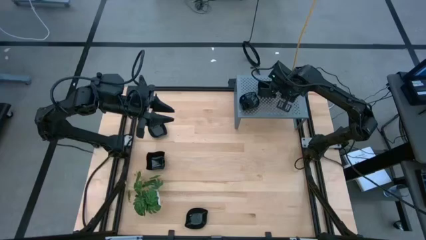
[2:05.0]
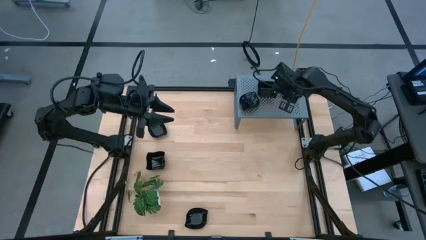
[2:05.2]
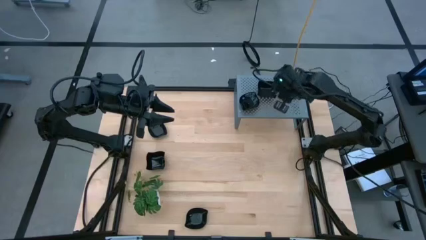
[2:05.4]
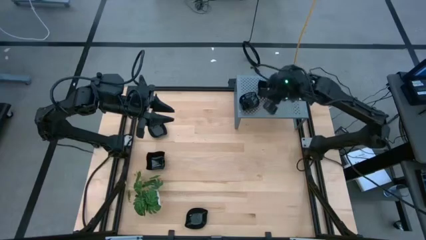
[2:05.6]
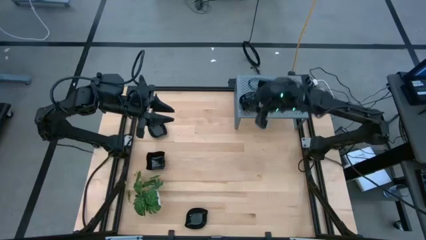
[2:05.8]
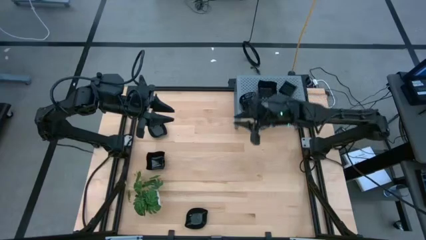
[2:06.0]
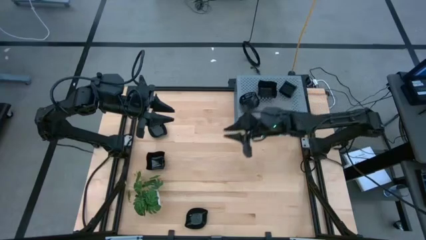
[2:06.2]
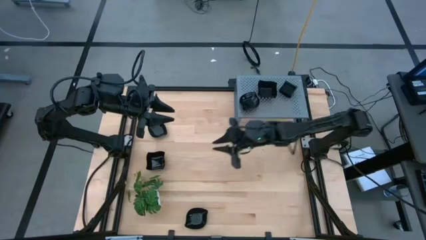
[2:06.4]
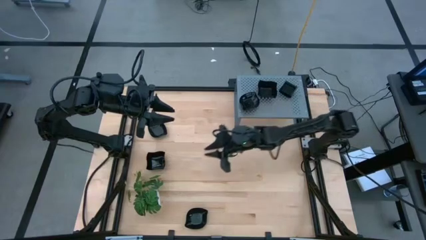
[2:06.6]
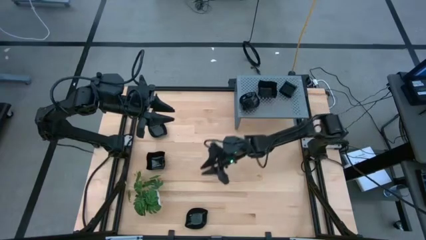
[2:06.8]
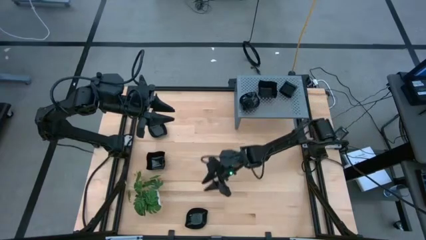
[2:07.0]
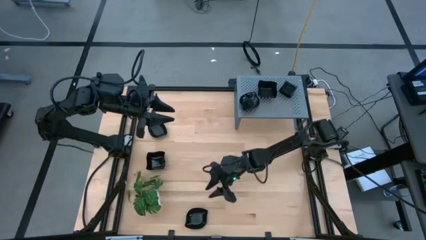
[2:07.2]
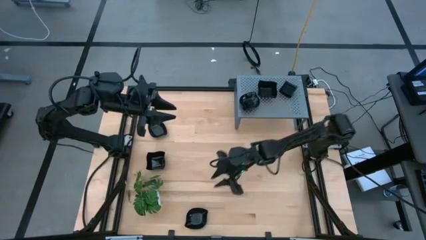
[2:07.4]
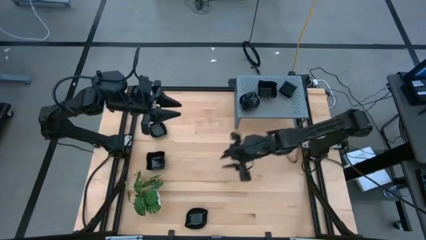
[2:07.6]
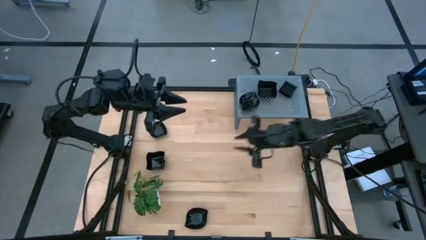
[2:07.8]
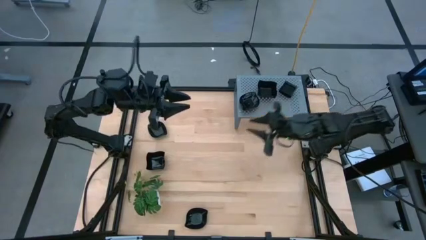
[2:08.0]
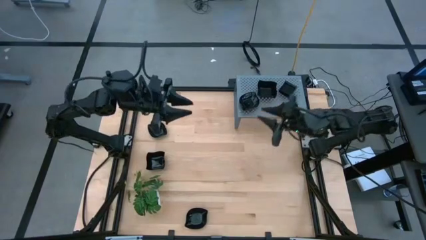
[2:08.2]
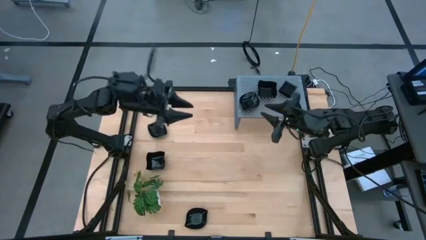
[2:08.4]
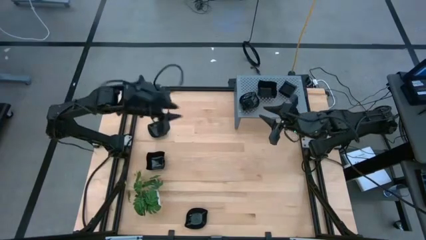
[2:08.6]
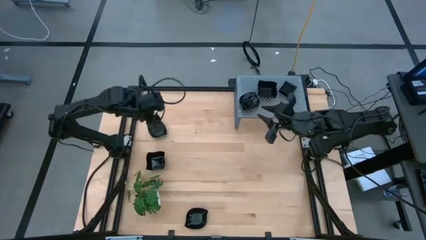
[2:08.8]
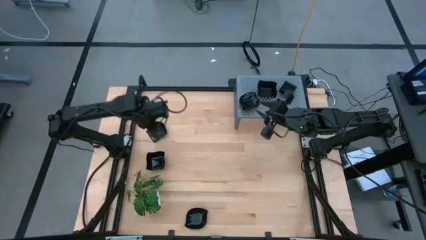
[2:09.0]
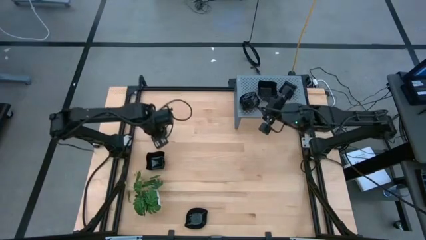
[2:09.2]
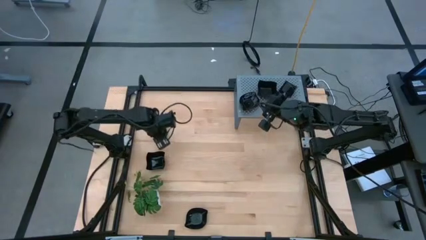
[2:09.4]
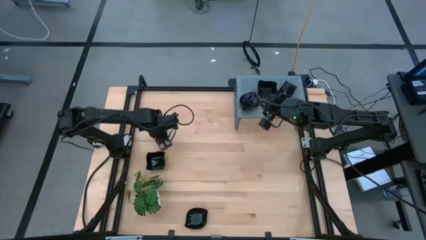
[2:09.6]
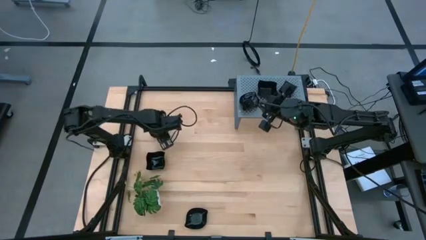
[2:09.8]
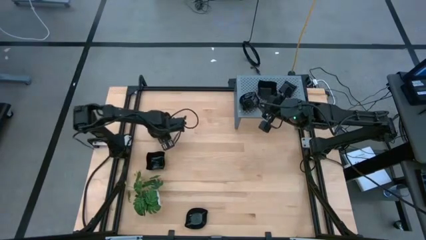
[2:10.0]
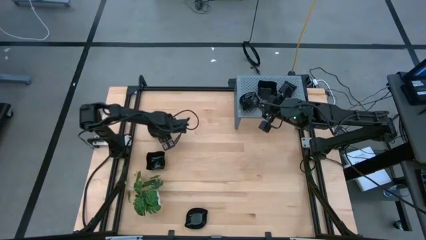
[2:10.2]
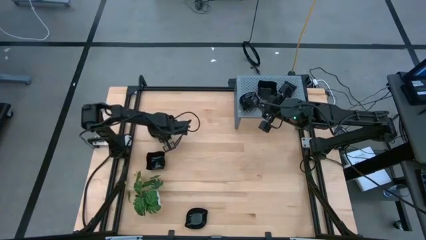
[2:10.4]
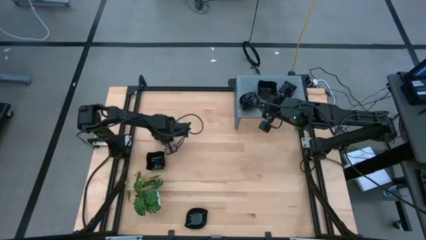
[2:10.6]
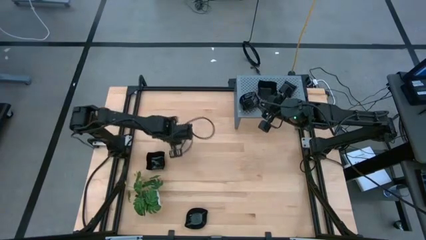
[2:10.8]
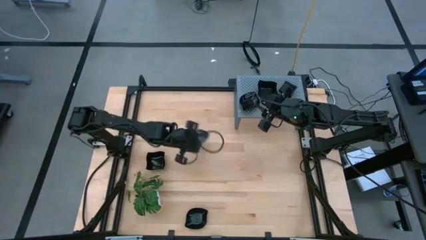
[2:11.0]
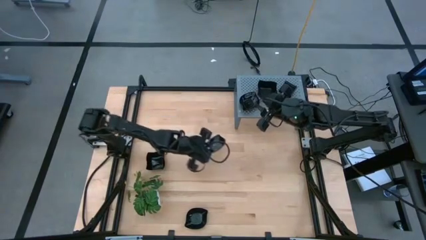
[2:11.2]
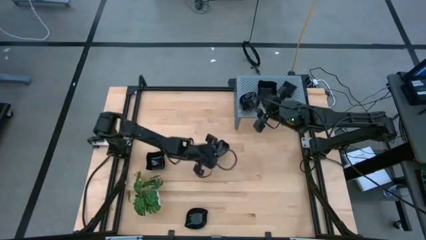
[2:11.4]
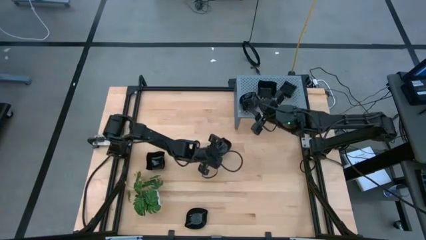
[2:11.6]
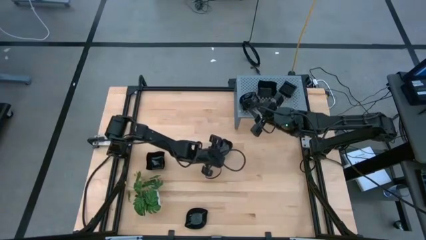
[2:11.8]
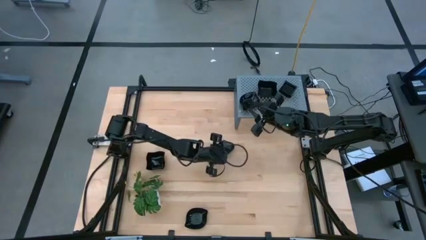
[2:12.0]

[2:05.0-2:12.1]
Task: Pick & Place Mini shaped plates
Move the leaf-shaped plate to the middle of the table

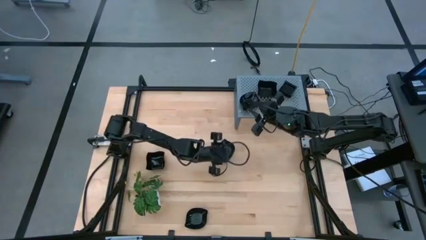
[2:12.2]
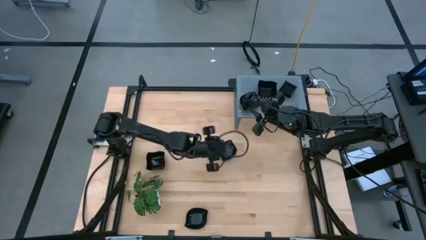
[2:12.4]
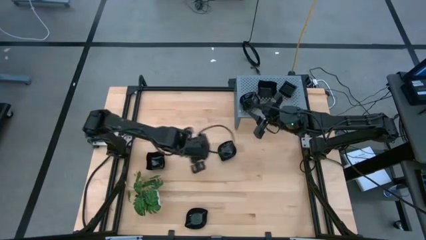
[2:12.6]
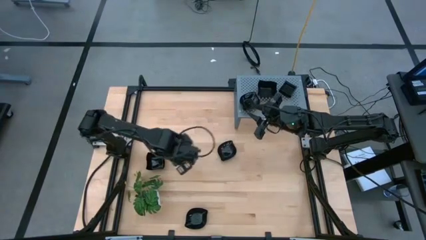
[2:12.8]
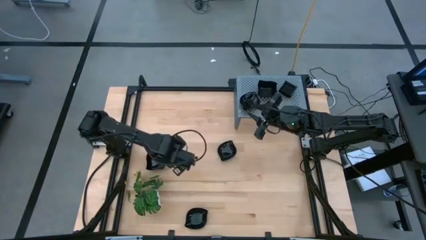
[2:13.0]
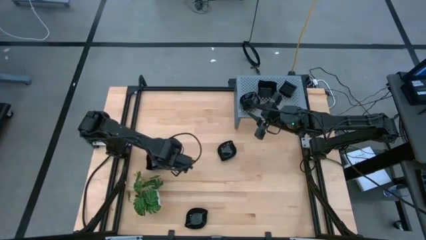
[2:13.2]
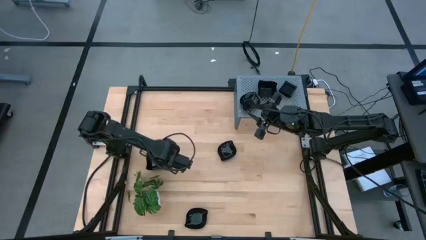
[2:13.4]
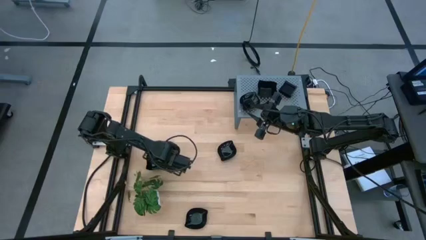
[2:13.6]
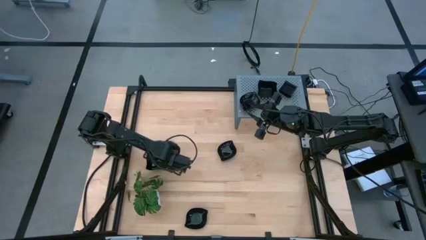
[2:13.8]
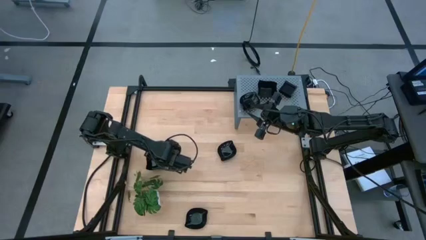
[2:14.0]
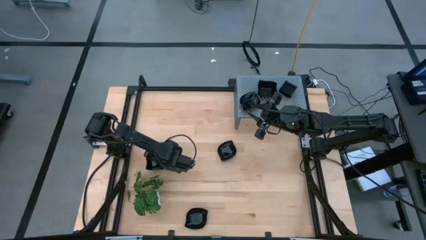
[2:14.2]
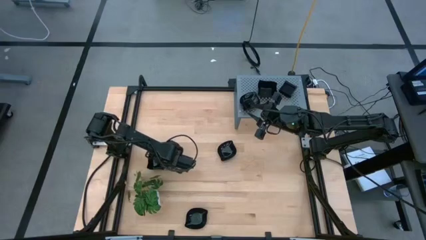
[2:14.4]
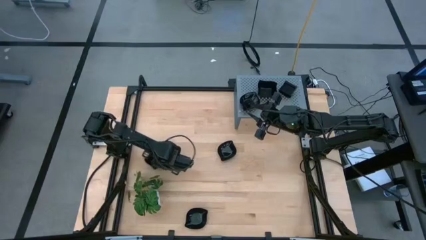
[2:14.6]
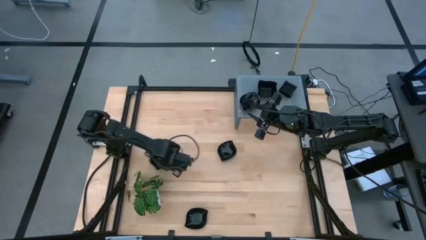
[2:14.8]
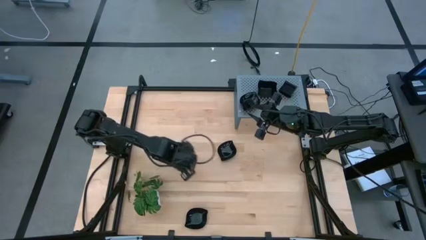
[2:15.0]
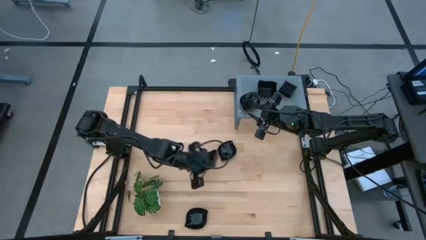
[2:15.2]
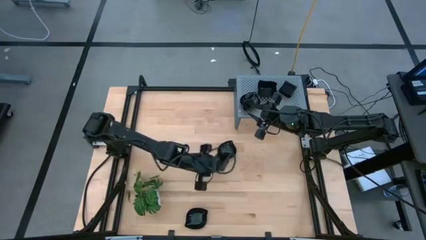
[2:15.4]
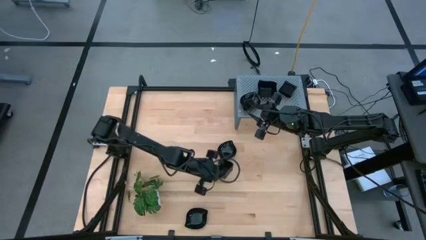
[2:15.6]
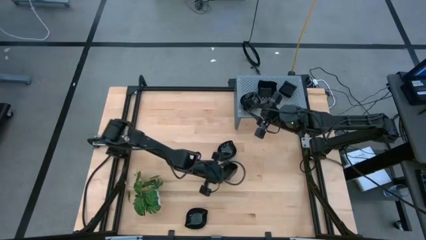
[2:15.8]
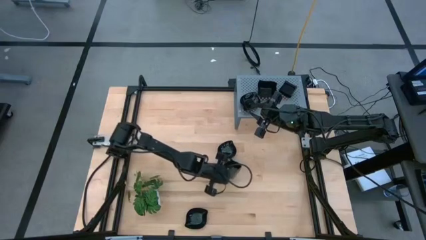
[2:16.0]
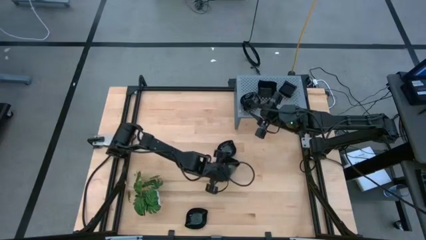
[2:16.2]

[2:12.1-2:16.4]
Move the distorted square plate to the middle of the table

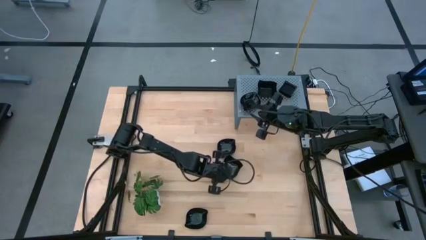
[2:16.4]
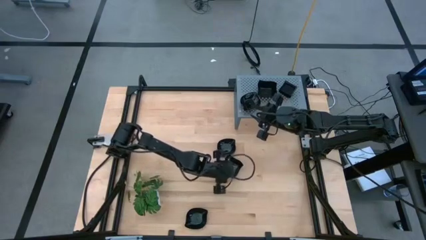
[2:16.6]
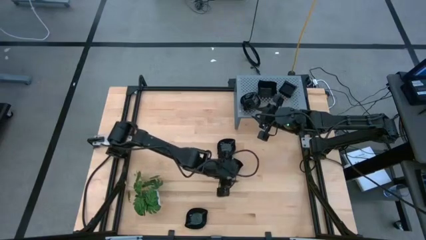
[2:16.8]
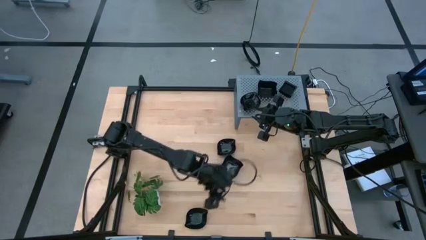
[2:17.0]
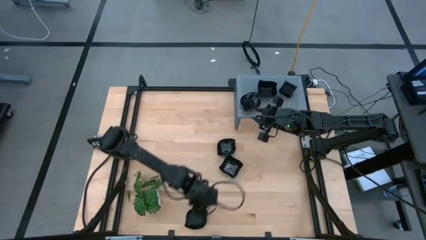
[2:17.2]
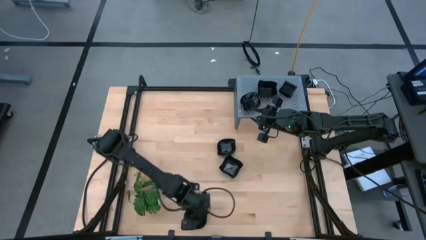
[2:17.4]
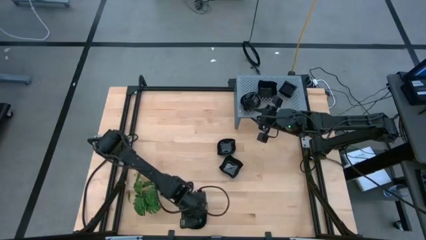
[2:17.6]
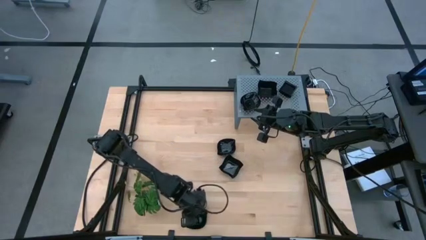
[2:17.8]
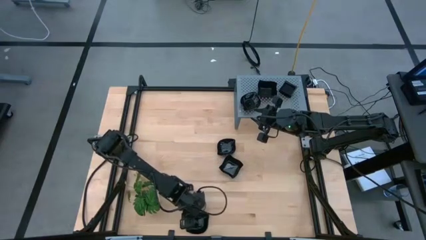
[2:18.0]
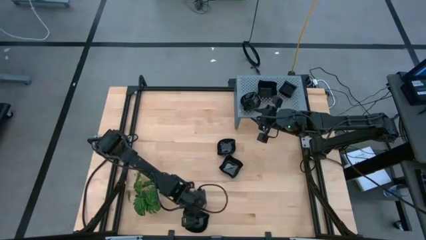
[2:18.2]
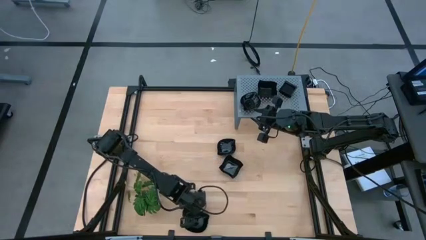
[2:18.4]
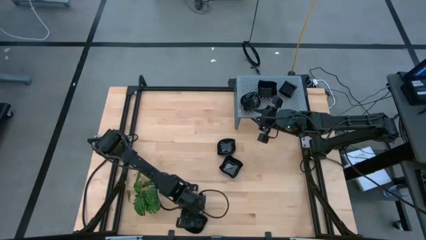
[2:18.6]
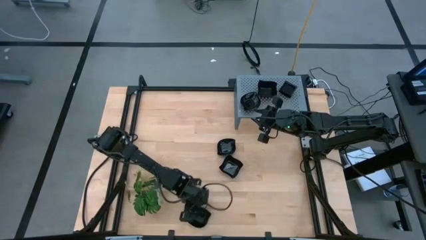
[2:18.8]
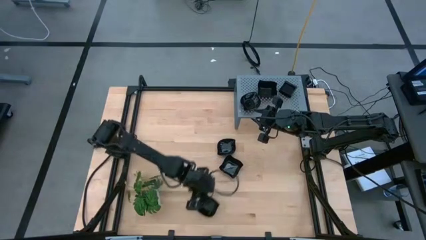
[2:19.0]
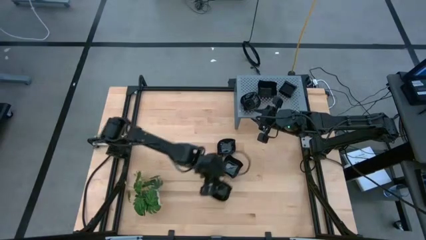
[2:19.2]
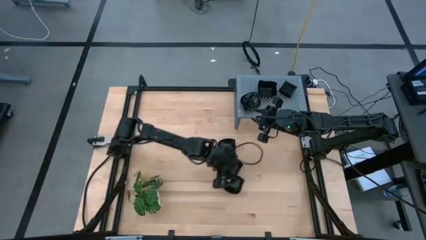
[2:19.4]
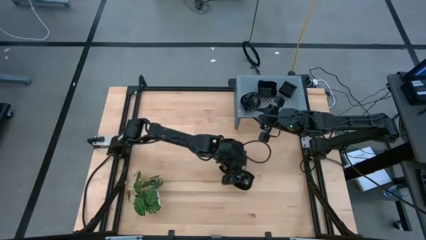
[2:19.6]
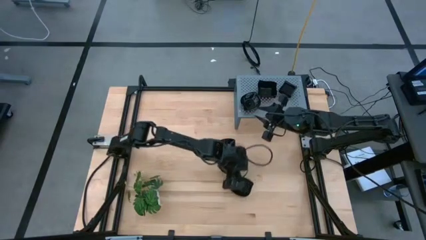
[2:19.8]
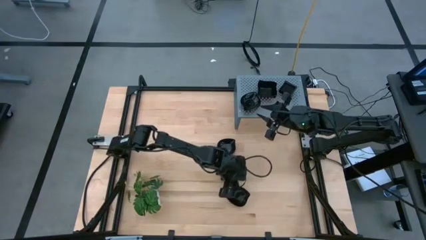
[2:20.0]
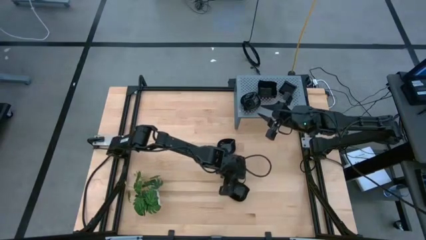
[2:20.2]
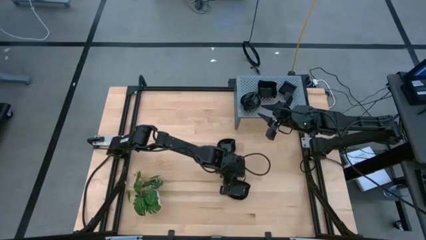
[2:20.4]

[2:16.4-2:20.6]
Move the leaf-shaped plate to the middle of the table
